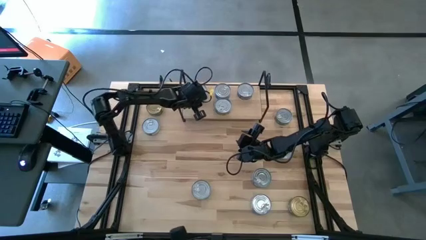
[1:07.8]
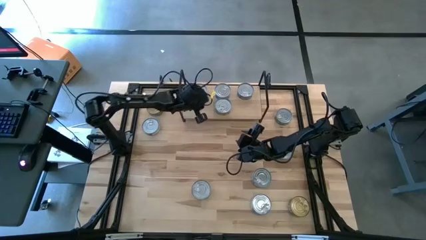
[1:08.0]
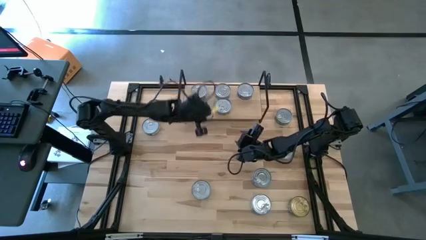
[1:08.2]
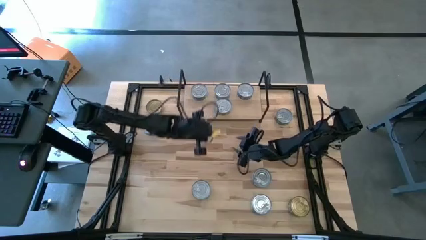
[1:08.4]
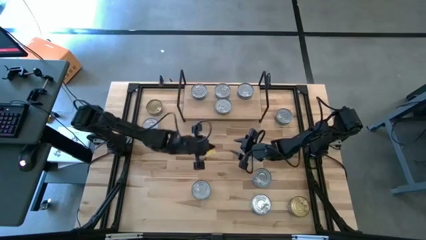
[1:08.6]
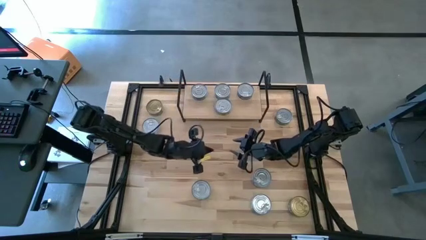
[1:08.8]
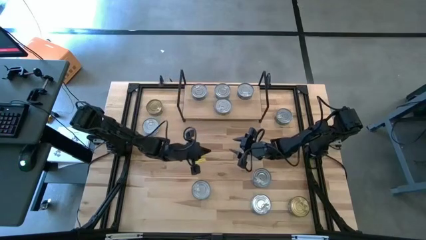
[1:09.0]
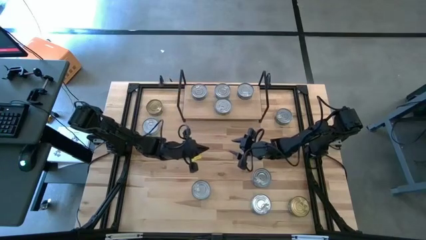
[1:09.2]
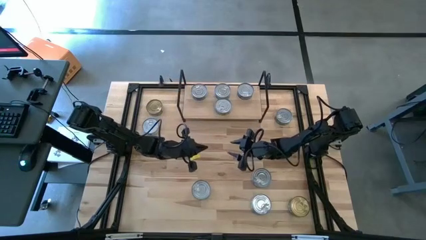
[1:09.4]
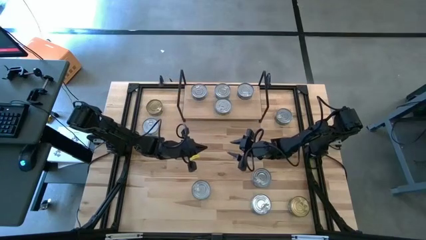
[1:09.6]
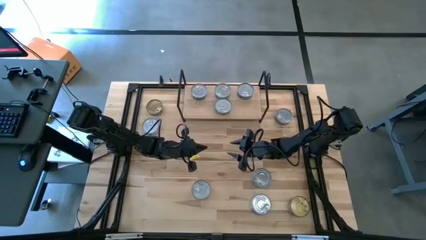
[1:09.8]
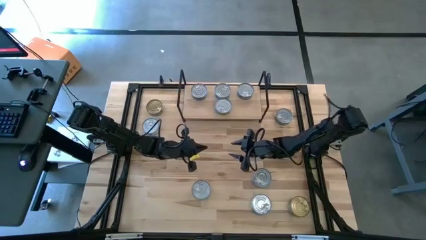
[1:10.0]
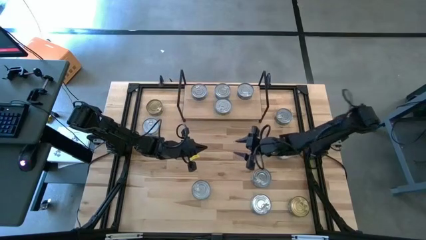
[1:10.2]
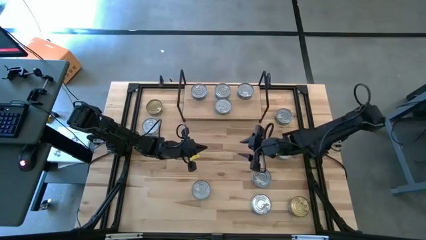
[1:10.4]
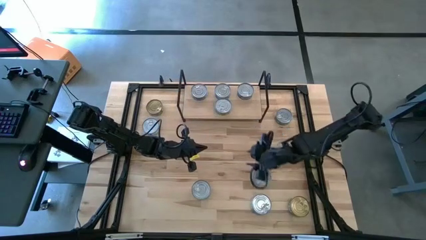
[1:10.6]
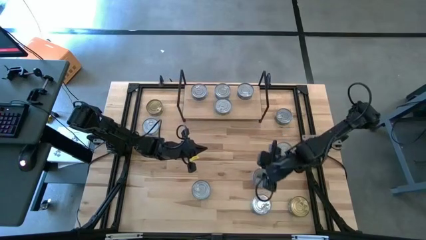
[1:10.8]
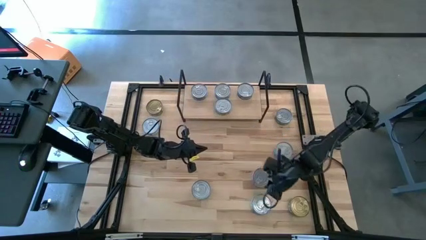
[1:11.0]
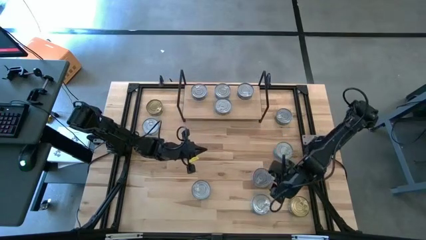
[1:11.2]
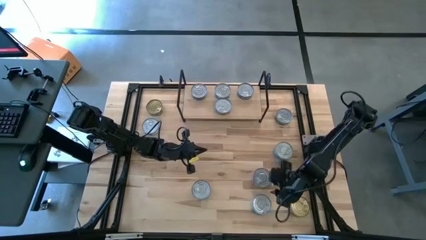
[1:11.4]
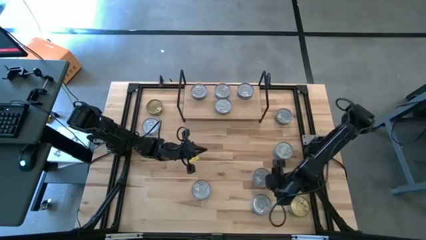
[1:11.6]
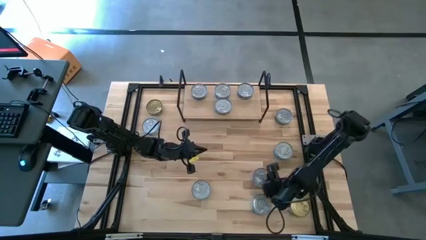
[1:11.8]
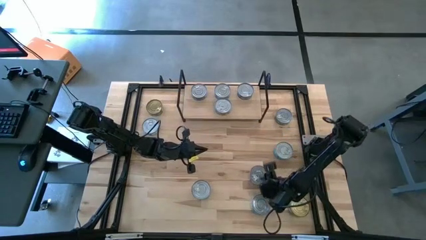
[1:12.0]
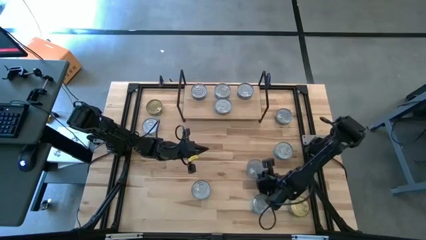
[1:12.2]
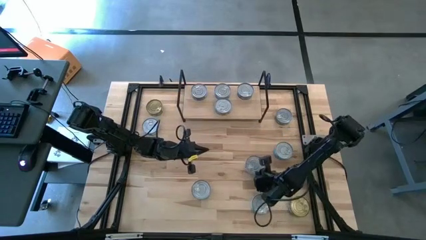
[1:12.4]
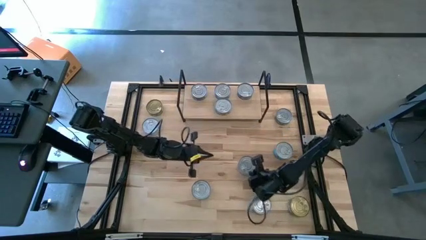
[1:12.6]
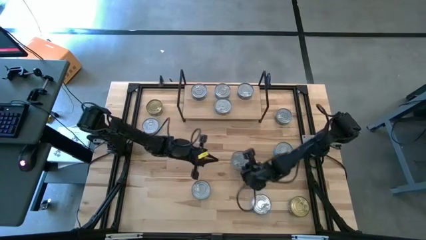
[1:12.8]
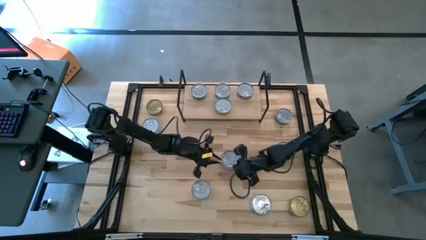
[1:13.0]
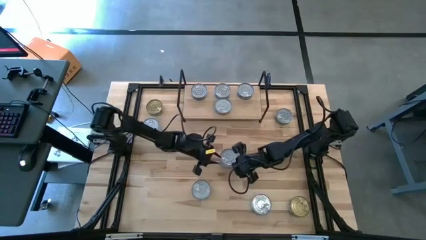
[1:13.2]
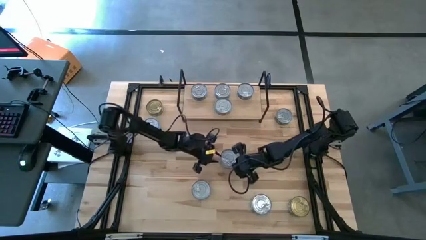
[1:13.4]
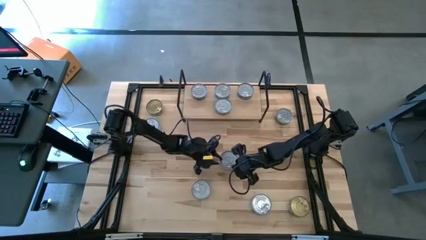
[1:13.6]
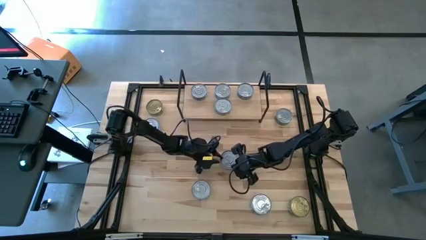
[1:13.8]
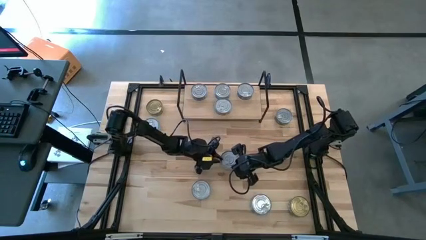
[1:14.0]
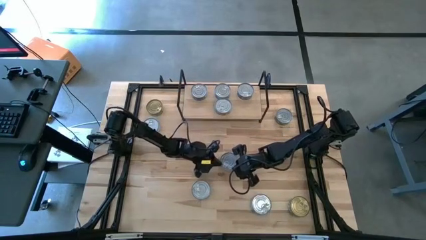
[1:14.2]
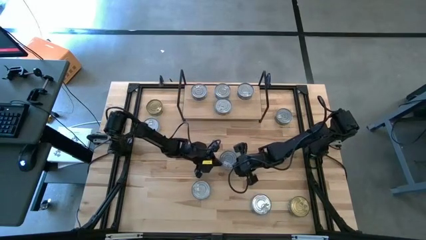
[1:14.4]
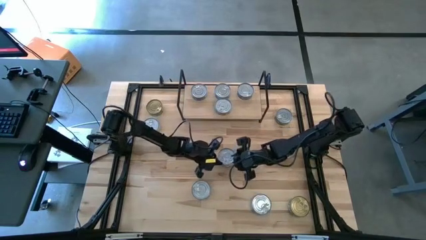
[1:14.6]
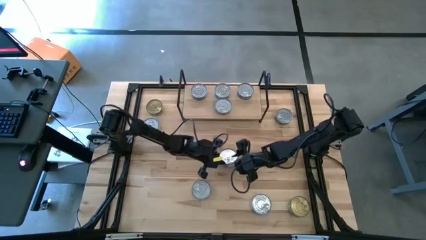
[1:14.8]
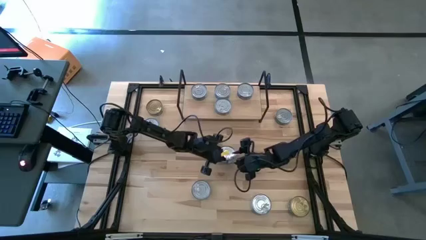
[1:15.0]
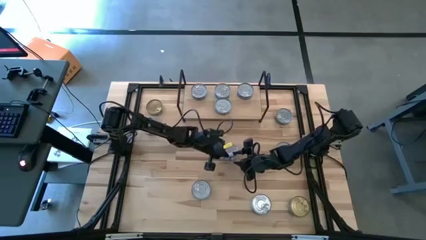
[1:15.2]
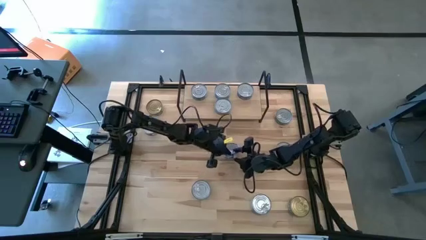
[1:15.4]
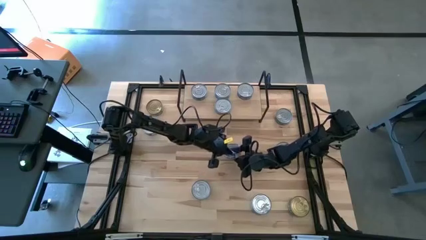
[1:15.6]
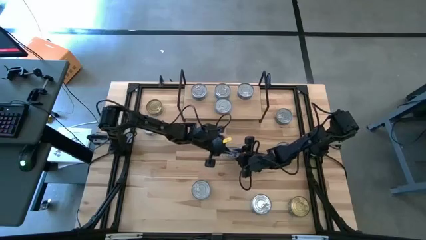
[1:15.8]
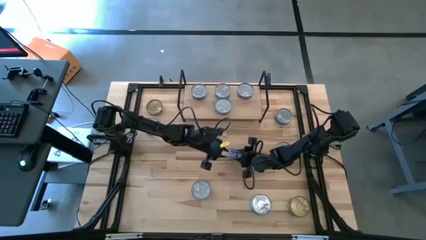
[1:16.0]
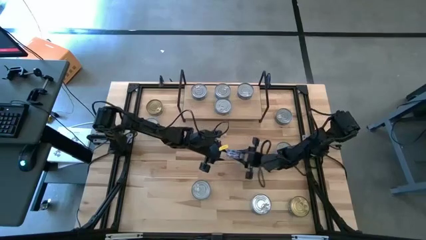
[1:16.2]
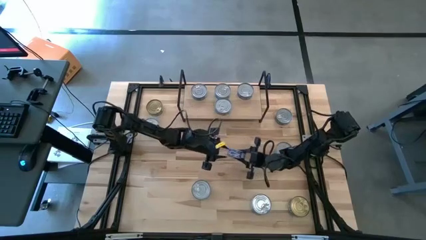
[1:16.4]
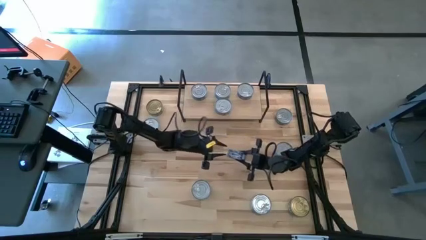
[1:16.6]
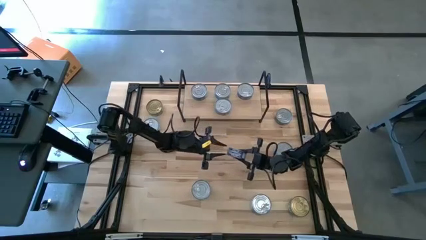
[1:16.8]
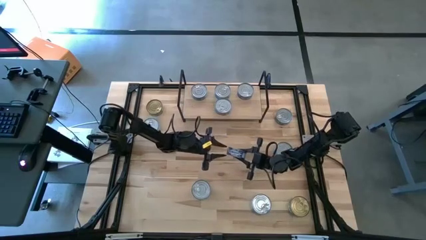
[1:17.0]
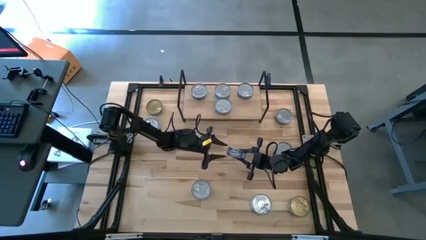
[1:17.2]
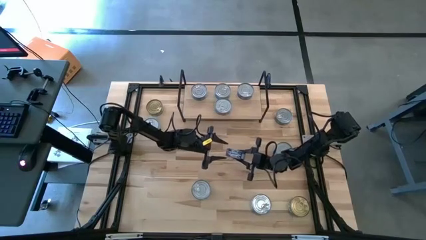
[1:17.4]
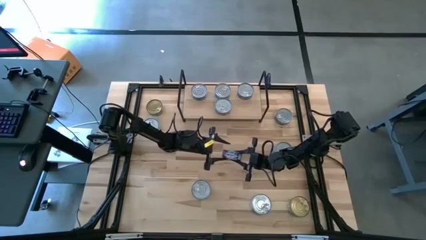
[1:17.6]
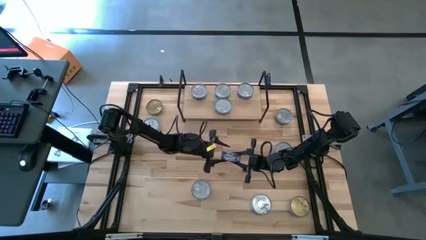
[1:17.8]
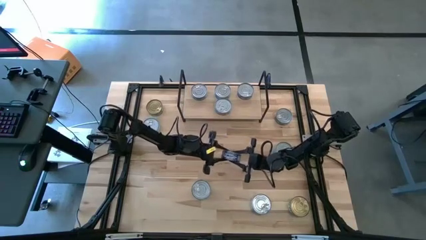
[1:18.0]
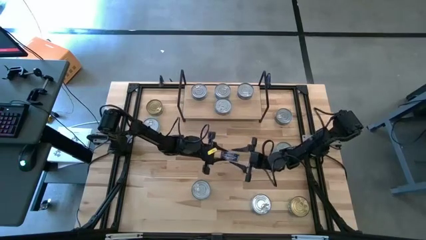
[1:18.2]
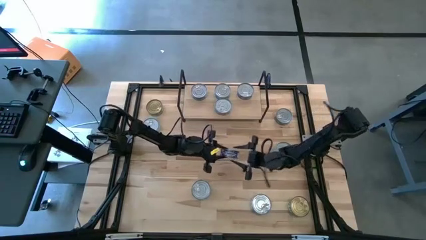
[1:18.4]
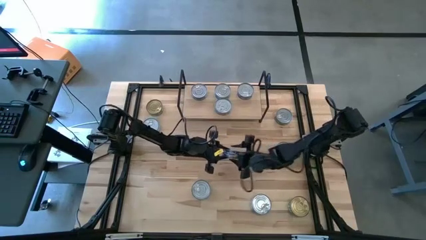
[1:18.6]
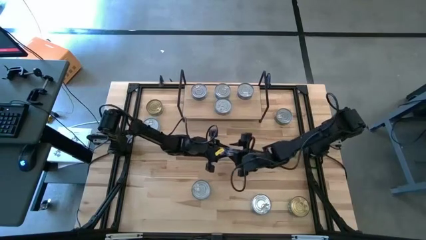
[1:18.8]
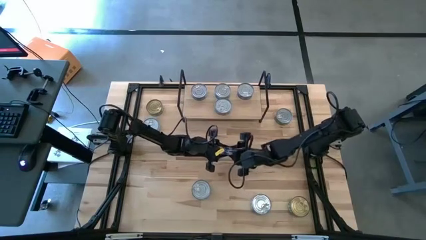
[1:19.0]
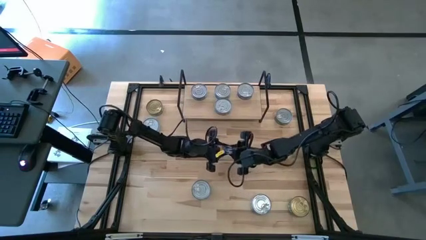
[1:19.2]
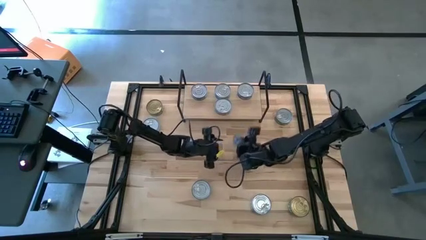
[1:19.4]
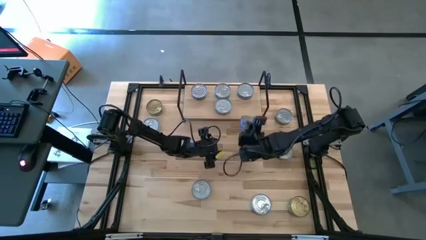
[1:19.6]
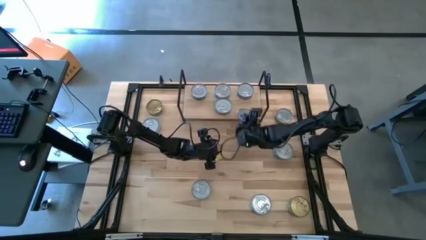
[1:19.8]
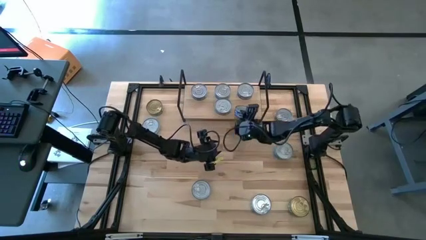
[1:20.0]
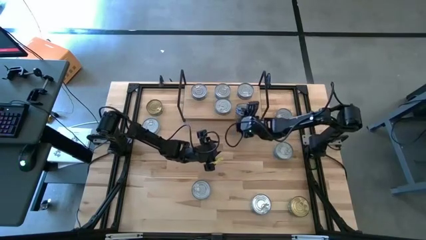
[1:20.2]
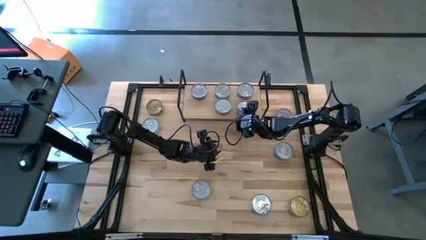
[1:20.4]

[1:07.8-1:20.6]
Task: Stack canned seafood by type on shelf
Put the dark blue tuna can aligned with the other dark blue tuna can on the shelf
